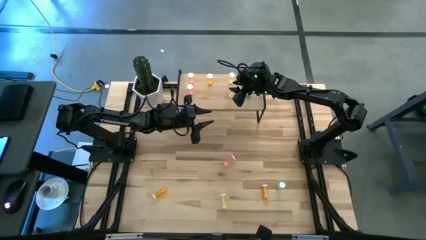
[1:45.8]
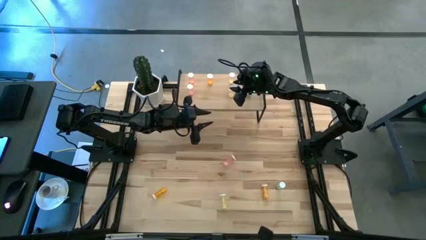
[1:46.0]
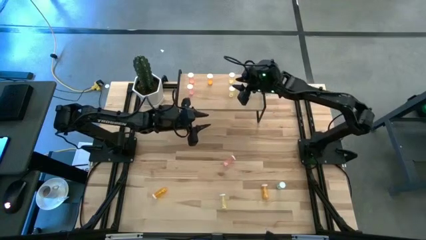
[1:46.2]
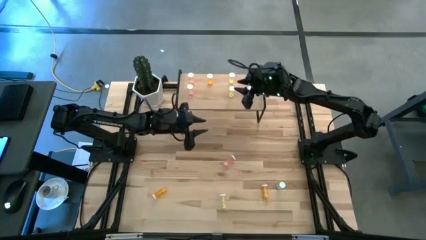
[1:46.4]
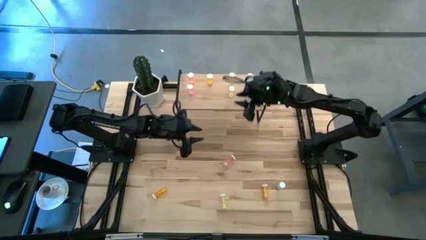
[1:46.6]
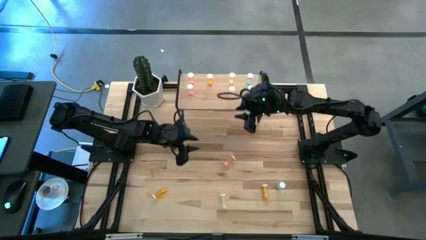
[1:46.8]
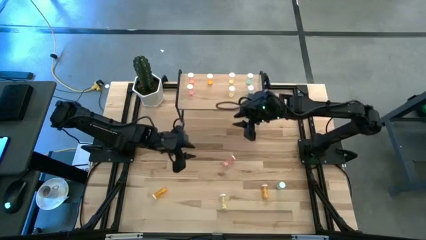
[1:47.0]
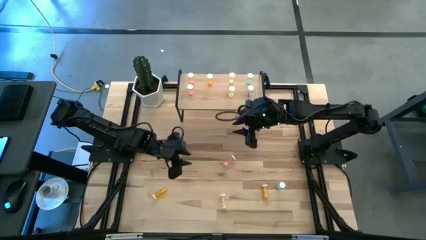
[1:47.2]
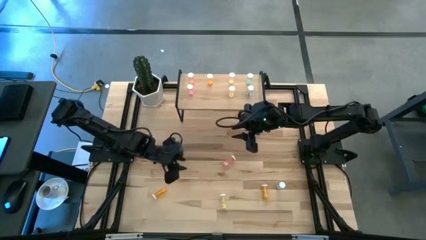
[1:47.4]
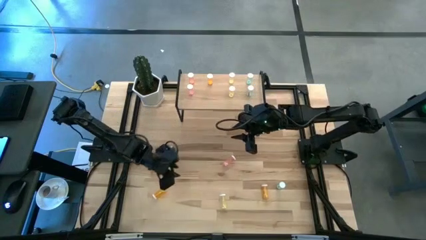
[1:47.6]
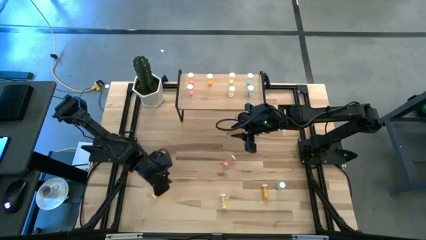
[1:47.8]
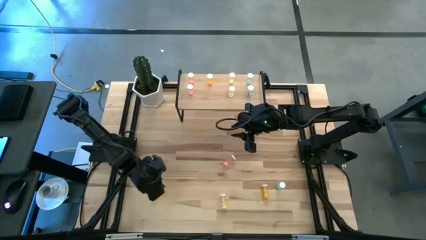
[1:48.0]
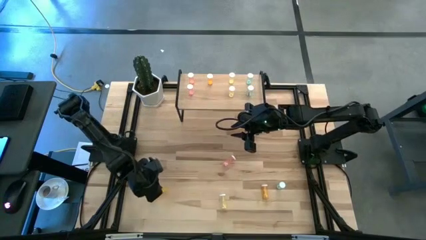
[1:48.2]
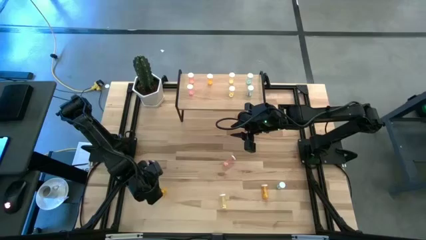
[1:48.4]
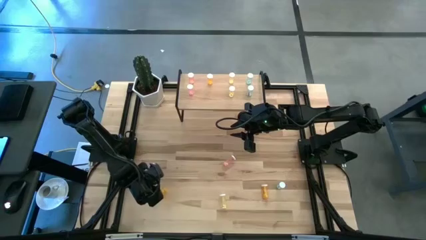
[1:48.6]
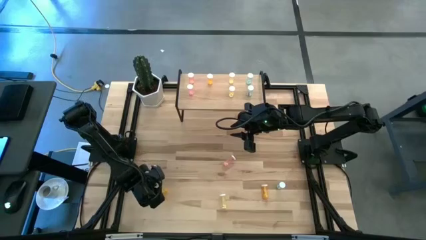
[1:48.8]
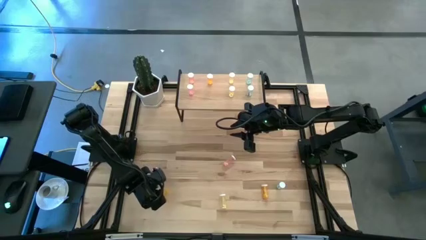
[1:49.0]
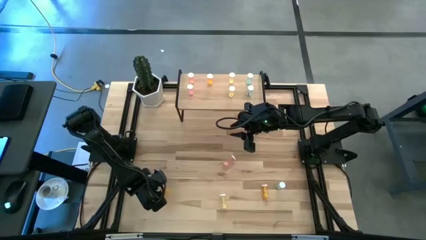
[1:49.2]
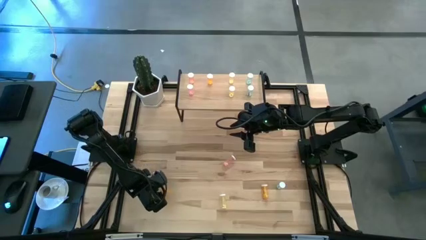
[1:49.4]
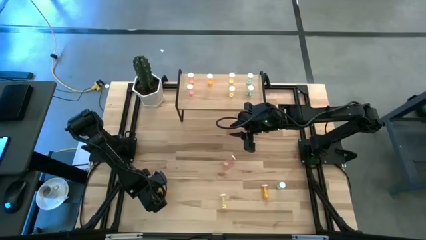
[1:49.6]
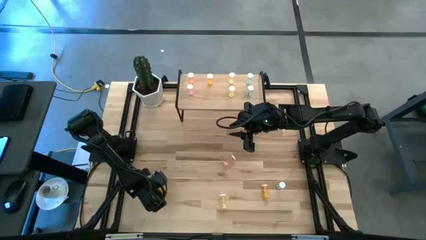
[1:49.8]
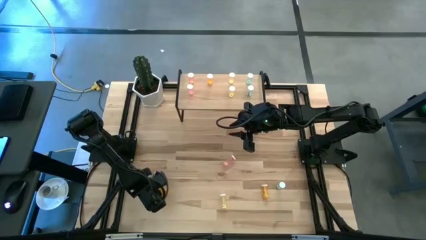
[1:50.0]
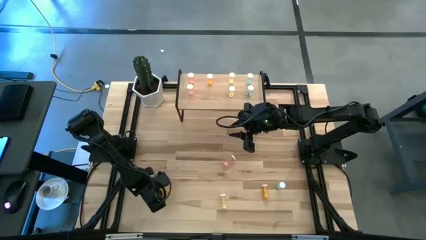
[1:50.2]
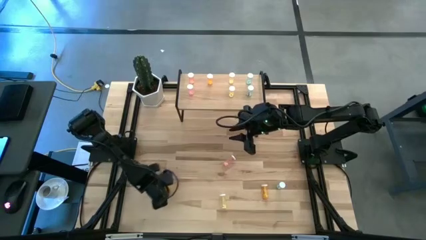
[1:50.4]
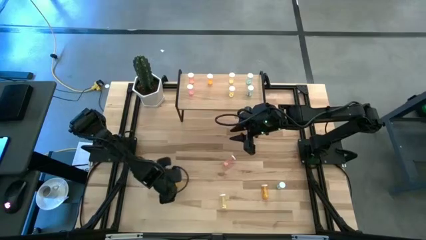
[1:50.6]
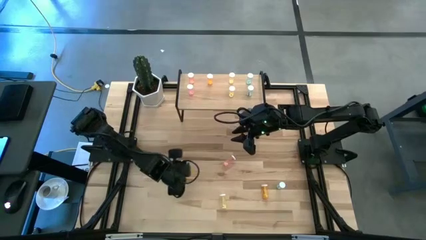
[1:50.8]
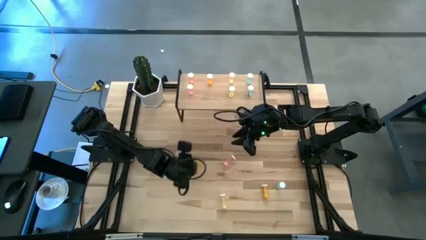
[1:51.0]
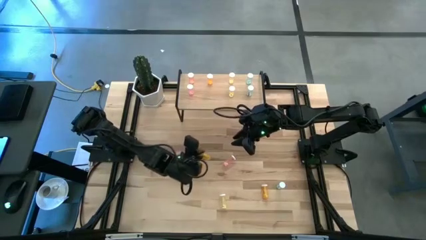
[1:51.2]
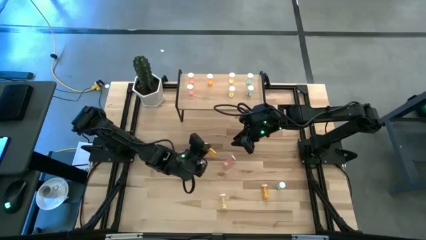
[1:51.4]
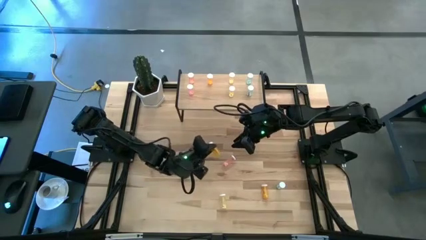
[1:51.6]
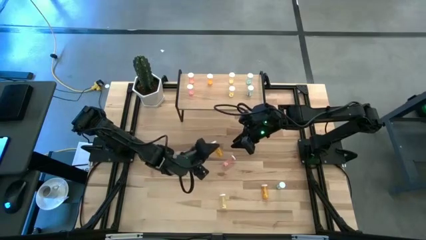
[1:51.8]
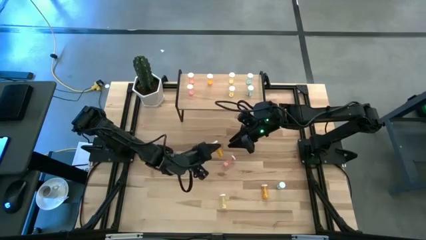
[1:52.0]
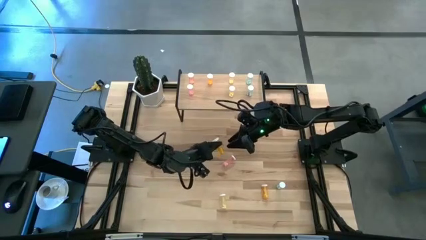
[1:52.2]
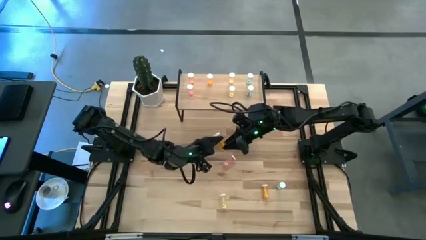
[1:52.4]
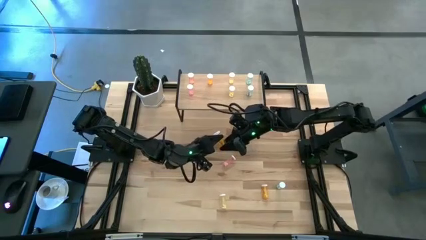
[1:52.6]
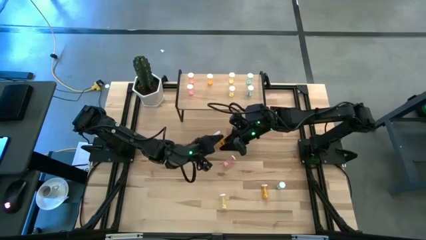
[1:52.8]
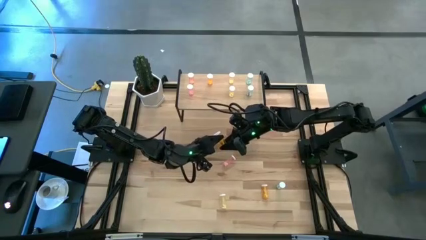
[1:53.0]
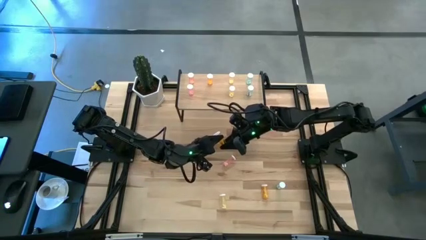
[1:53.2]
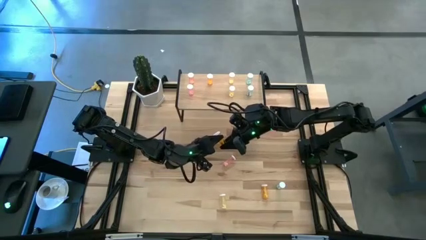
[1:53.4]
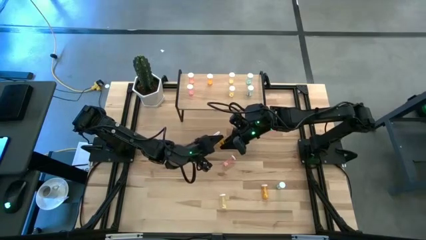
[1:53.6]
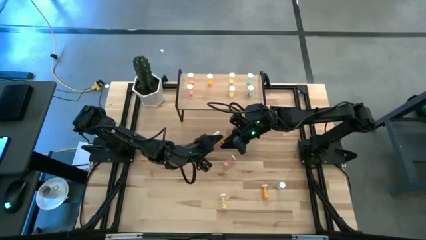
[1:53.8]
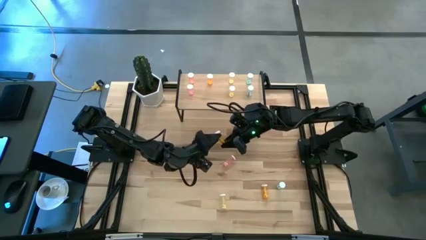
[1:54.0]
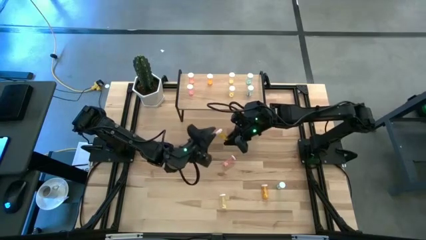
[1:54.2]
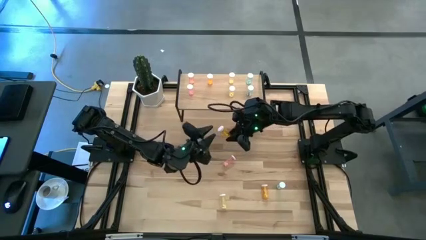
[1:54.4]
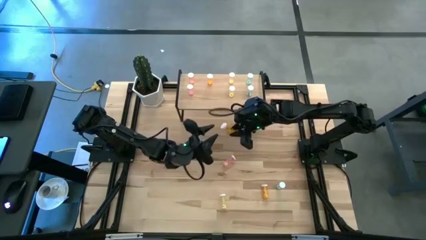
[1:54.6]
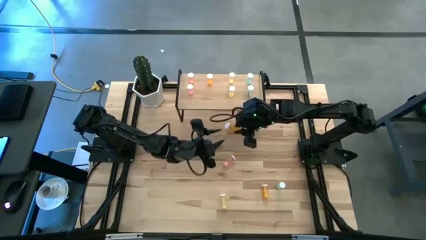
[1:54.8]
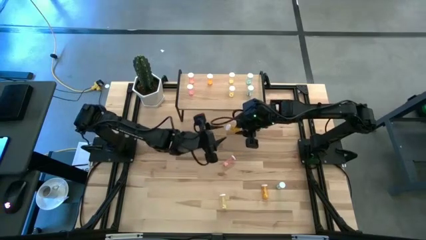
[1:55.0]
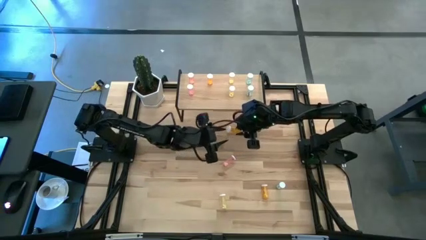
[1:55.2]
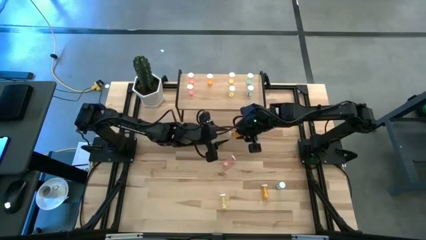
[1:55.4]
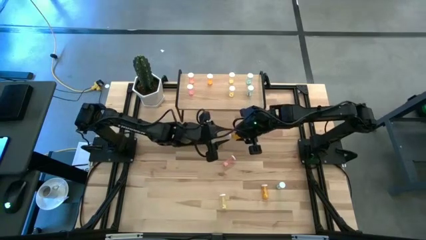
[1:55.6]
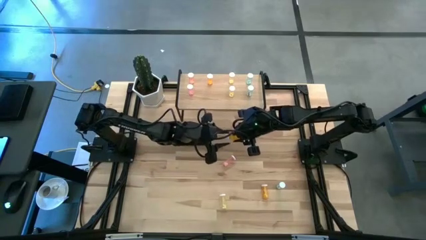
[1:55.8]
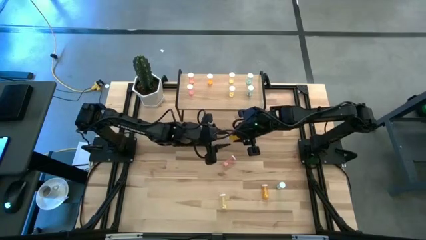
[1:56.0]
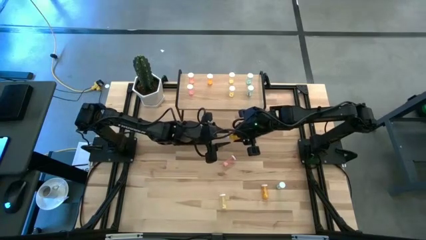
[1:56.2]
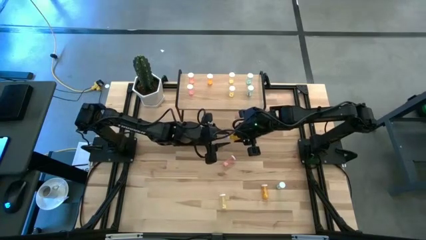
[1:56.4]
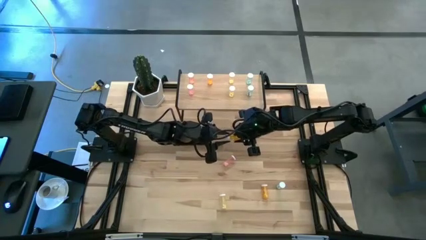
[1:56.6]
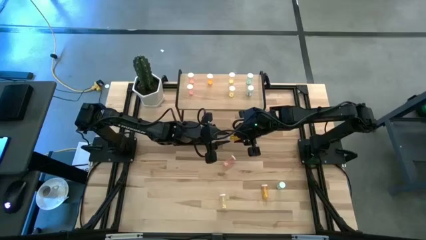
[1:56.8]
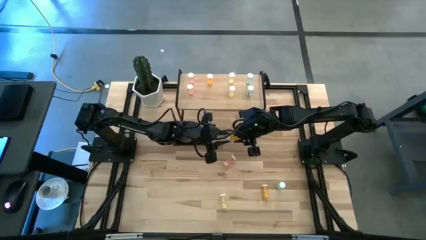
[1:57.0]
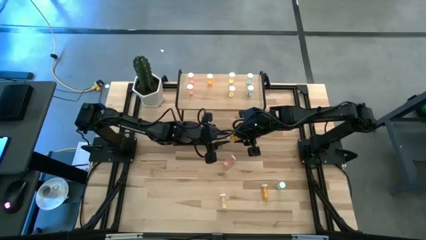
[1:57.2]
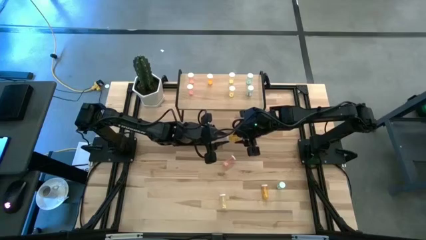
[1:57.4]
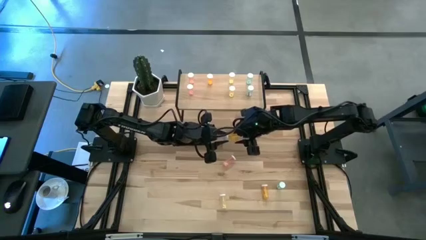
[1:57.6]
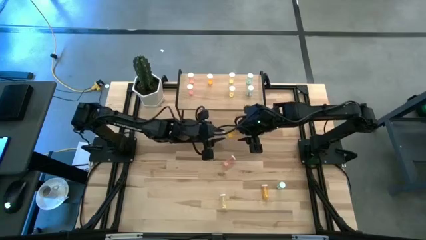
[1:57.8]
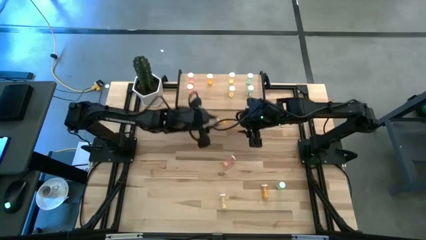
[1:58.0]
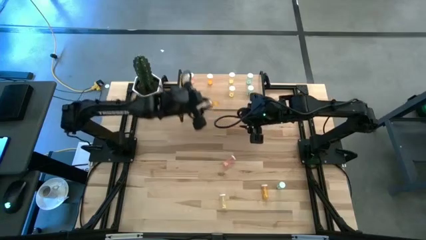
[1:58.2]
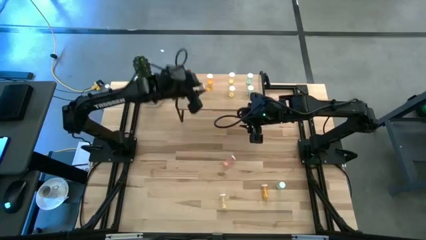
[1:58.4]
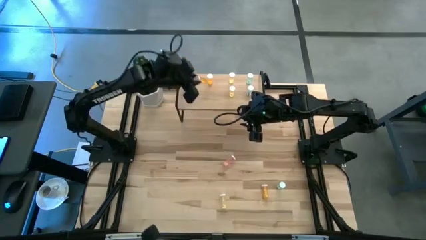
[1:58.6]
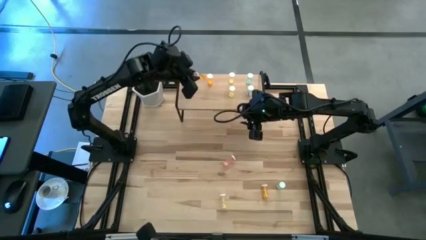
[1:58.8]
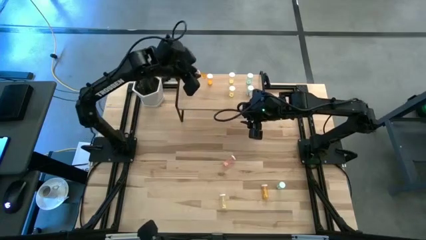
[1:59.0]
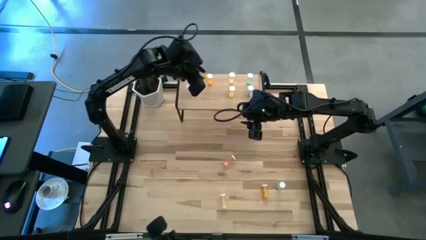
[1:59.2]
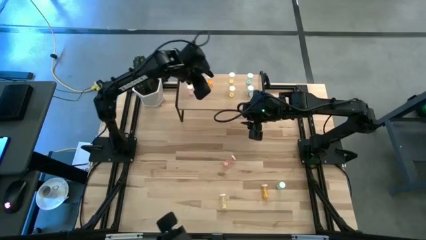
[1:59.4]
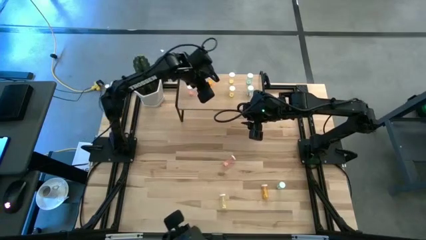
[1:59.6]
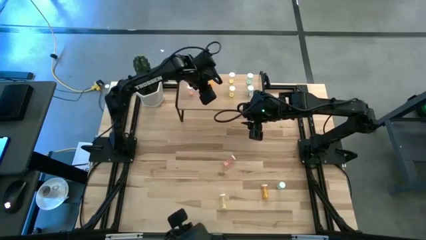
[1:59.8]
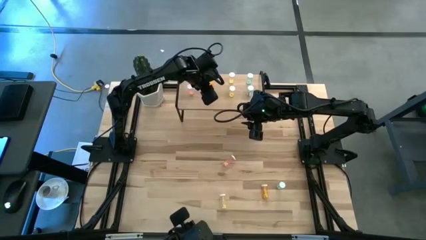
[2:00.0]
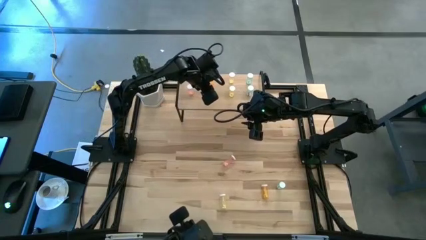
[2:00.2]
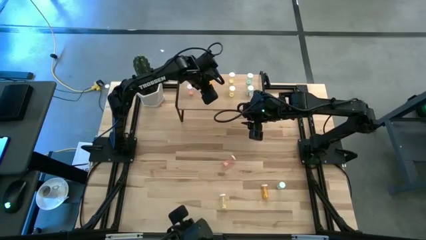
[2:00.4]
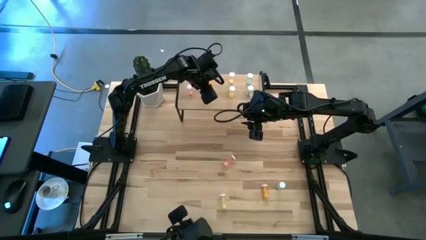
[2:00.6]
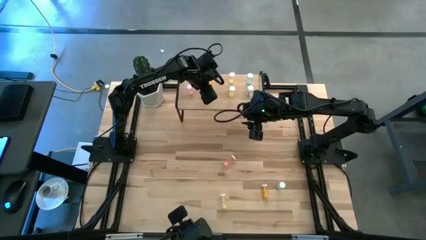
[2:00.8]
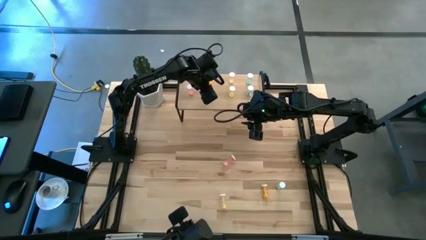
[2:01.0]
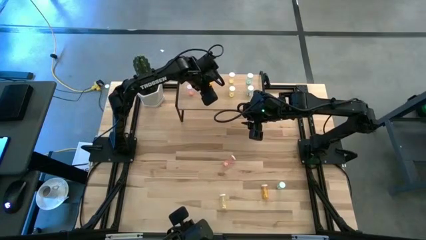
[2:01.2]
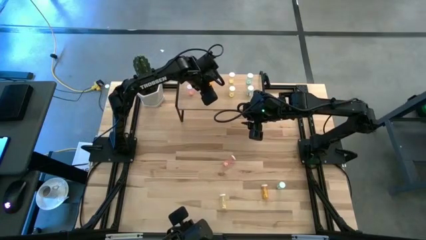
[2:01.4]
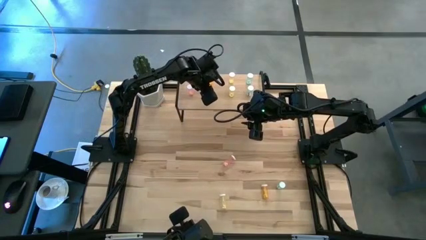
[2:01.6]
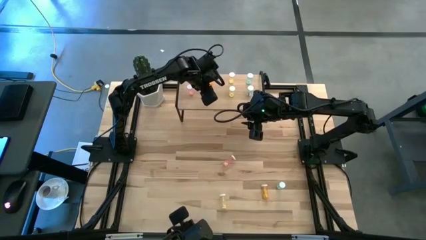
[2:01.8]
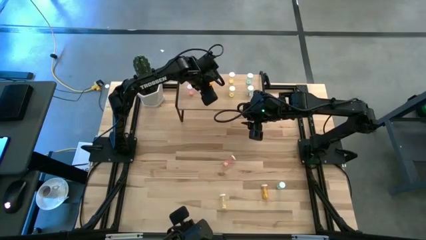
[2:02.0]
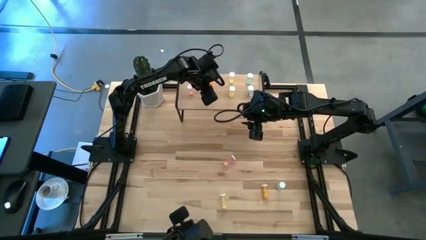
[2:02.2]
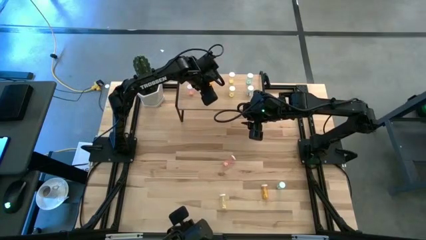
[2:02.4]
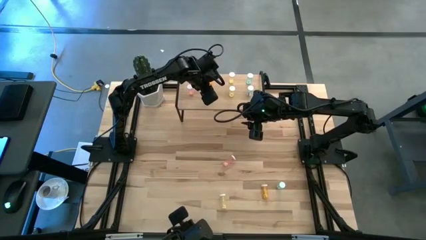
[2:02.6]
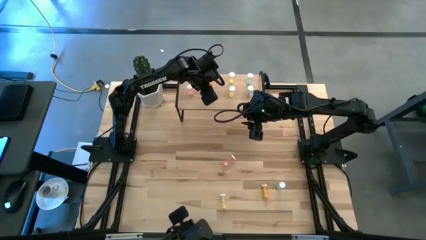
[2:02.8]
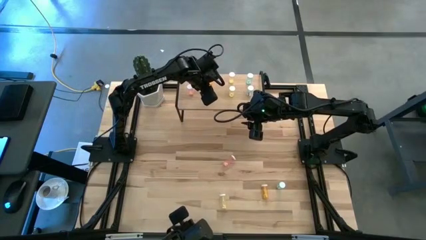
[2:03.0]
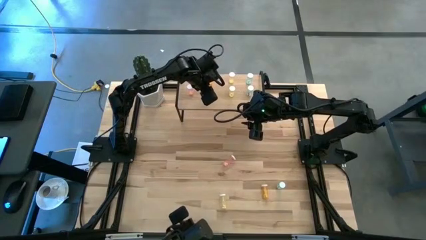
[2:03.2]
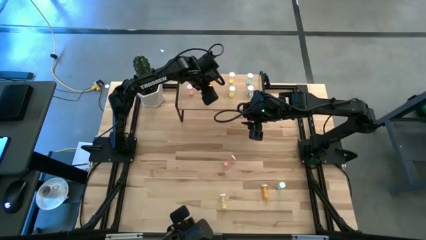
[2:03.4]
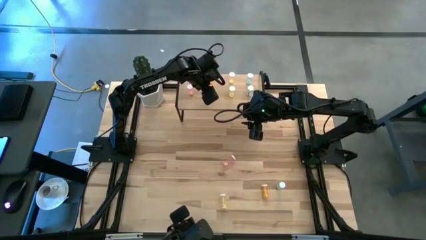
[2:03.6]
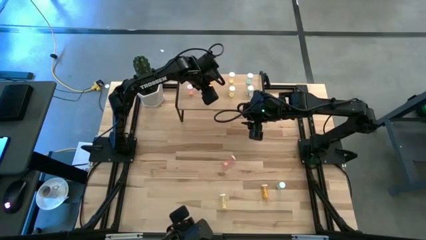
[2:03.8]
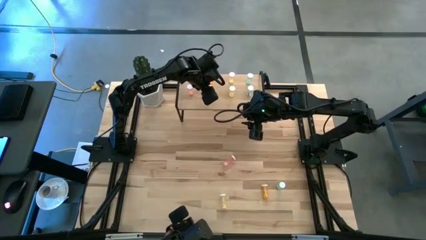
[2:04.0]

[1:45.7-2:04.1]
Task: Pick and place medicine bottles onto shelf by color
Put the left orange pill bottle aligned with the other orange pill bottle on the shelf
